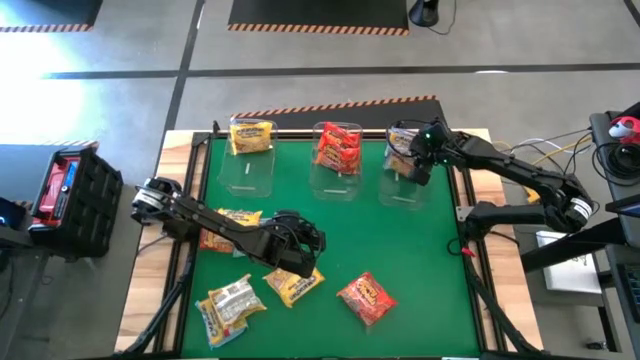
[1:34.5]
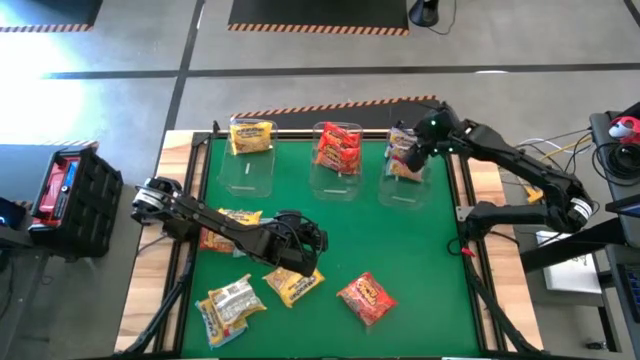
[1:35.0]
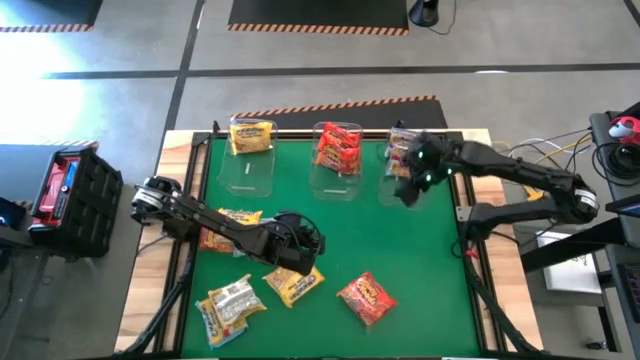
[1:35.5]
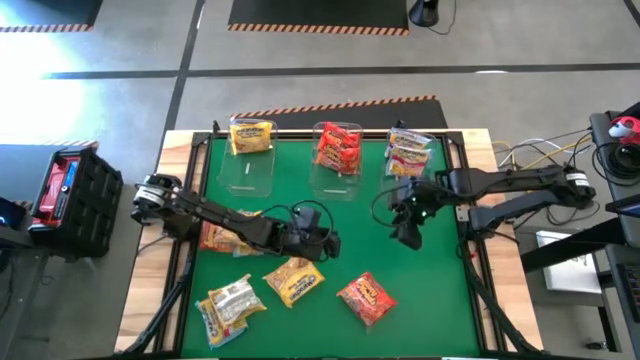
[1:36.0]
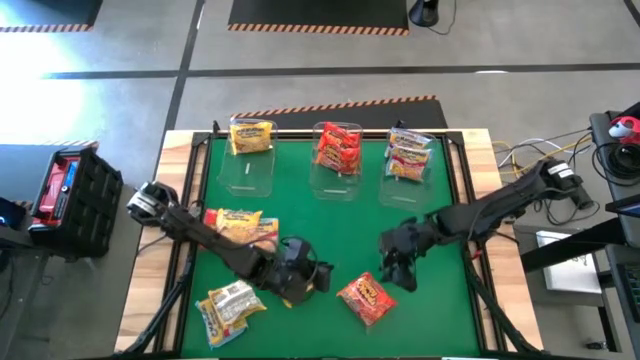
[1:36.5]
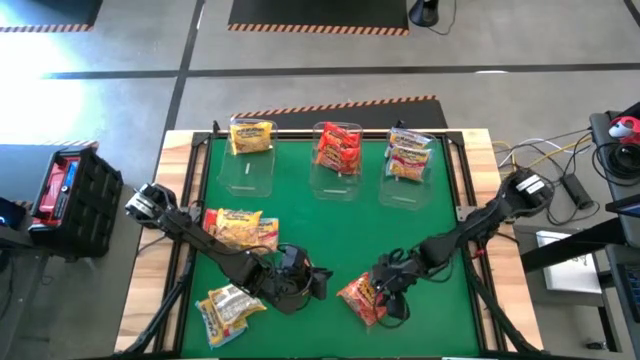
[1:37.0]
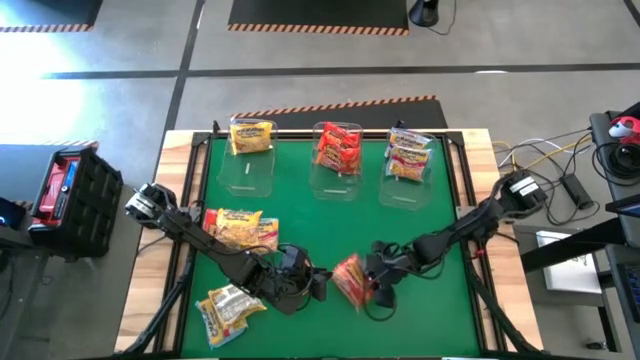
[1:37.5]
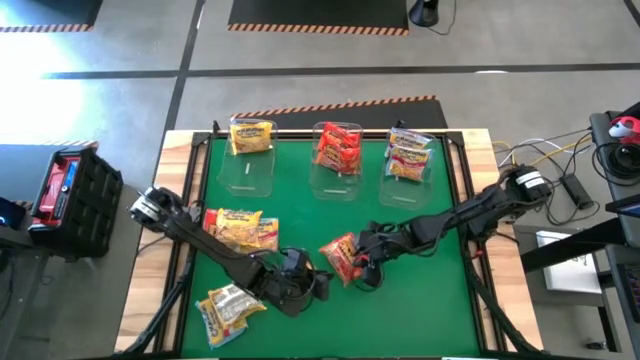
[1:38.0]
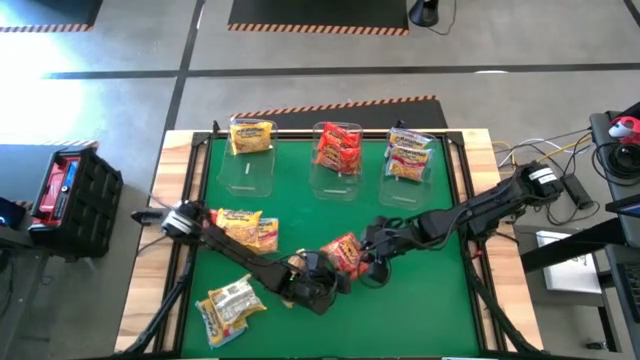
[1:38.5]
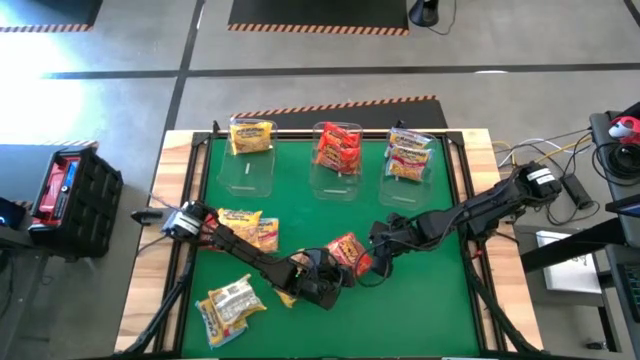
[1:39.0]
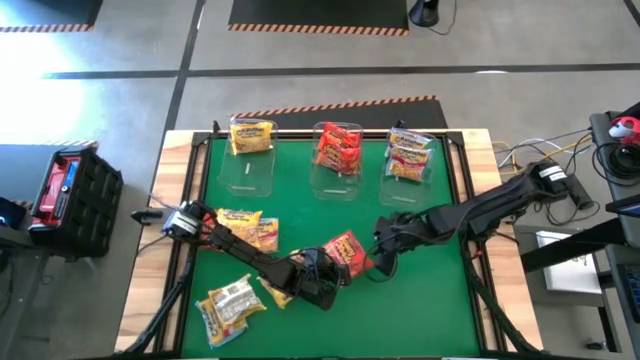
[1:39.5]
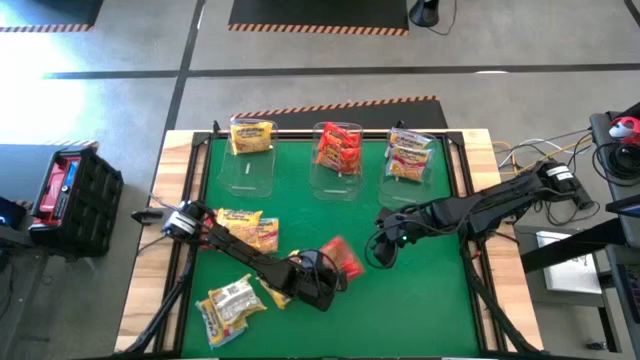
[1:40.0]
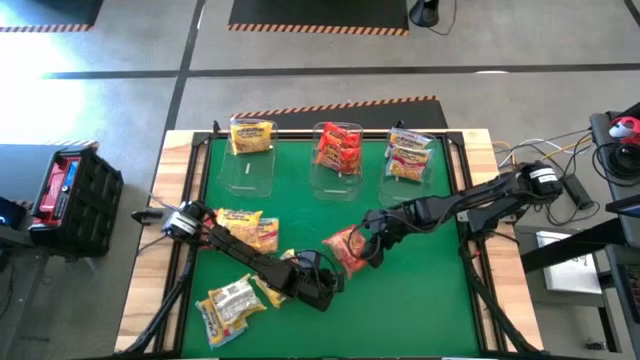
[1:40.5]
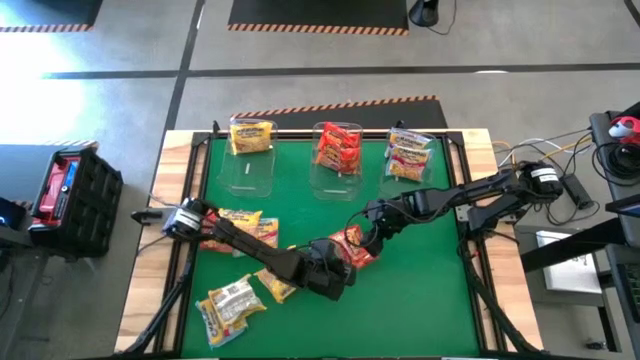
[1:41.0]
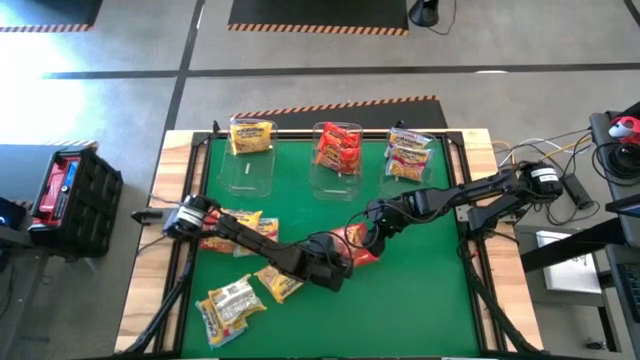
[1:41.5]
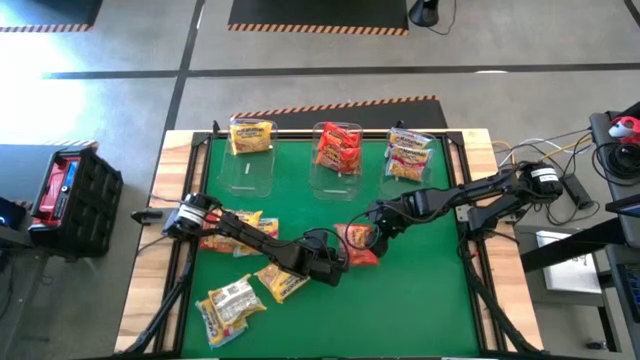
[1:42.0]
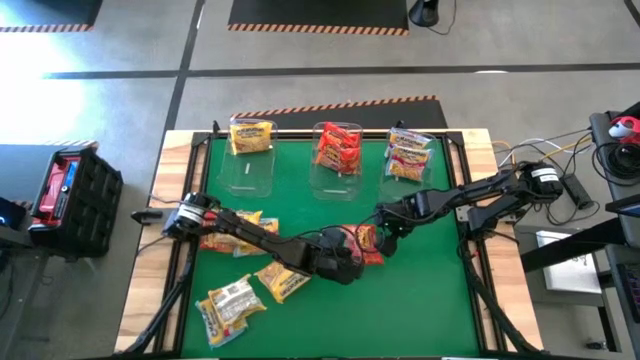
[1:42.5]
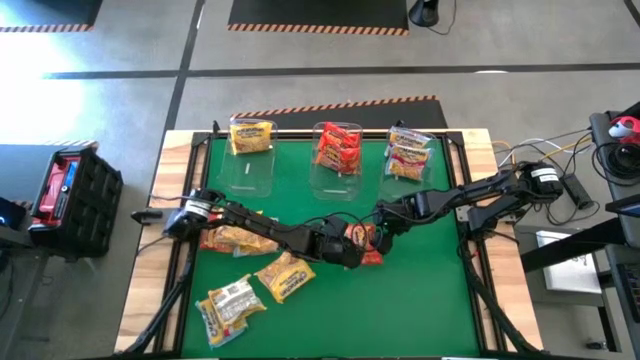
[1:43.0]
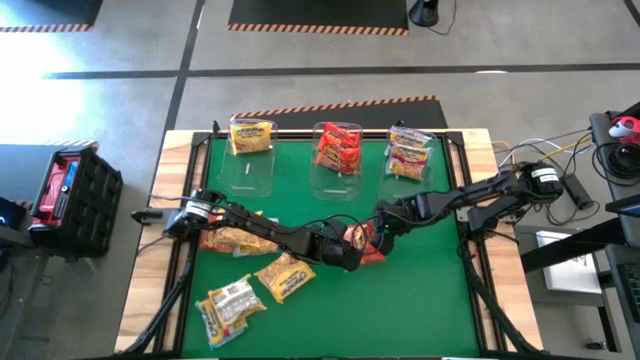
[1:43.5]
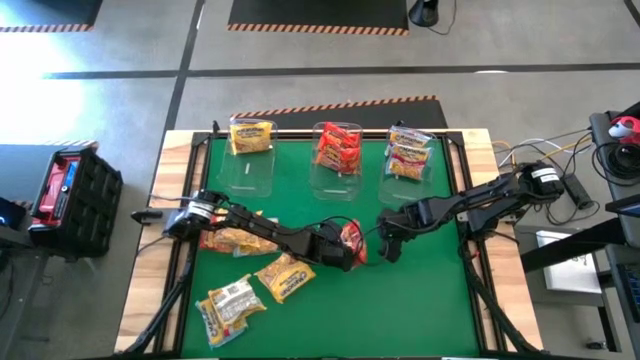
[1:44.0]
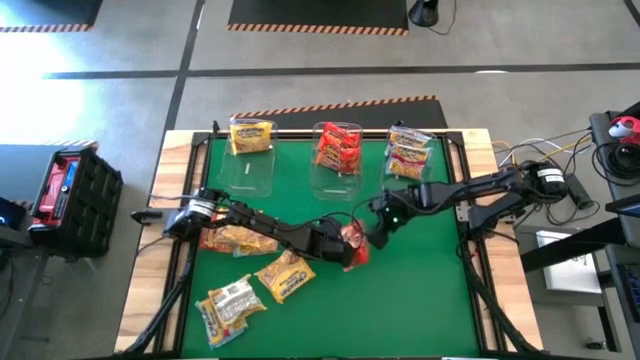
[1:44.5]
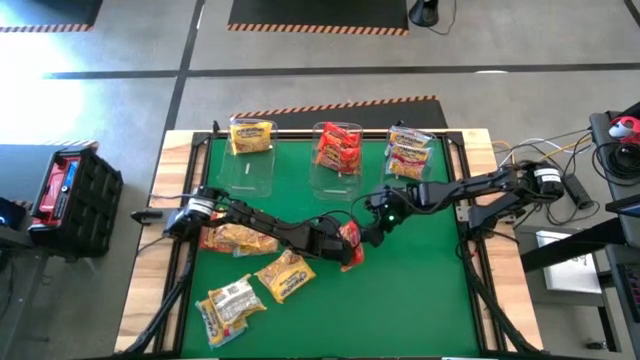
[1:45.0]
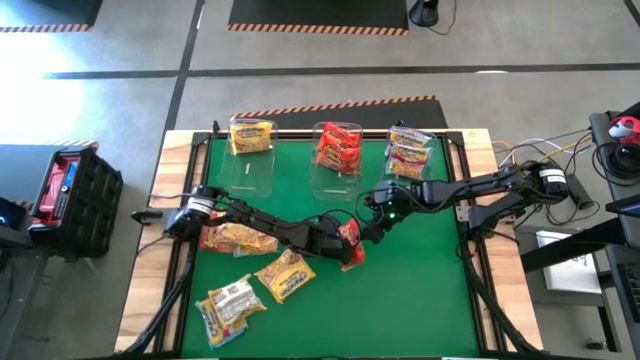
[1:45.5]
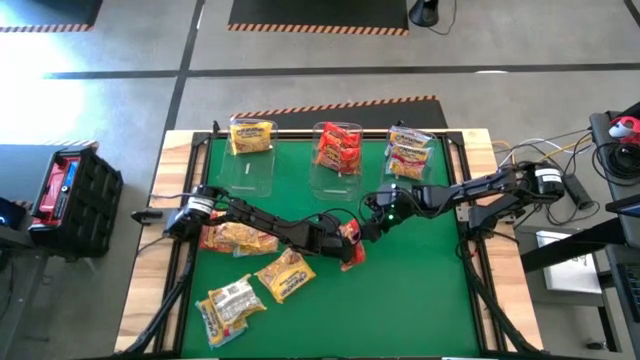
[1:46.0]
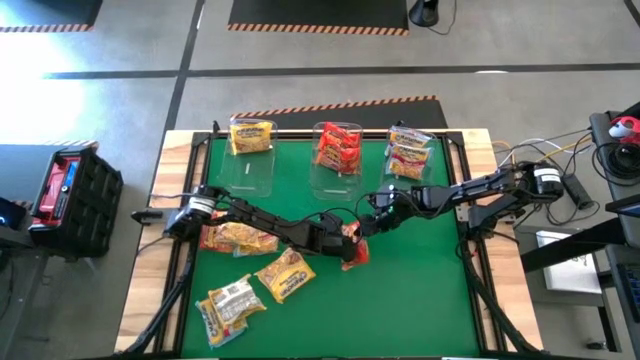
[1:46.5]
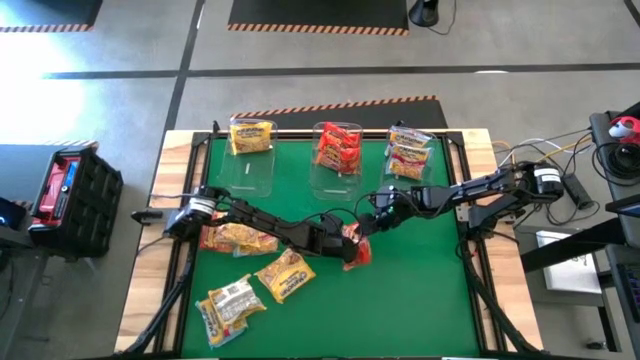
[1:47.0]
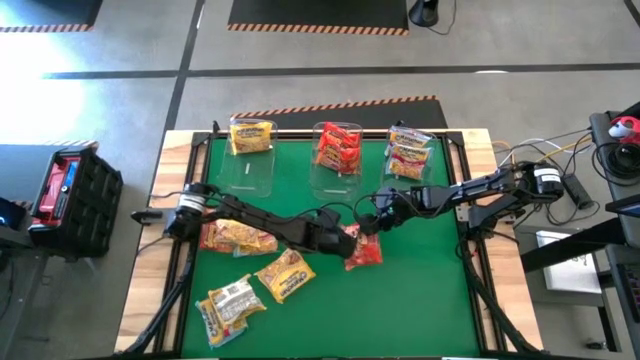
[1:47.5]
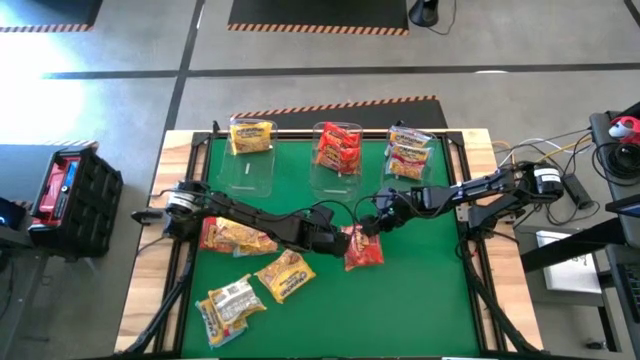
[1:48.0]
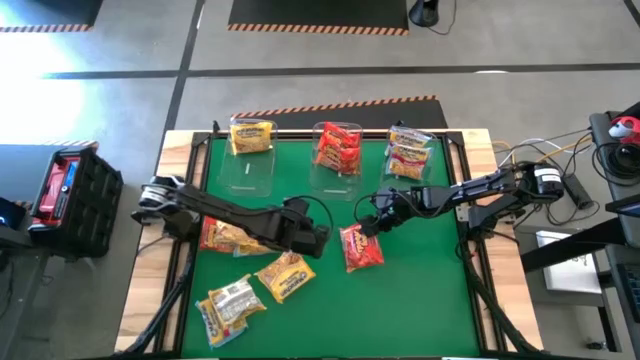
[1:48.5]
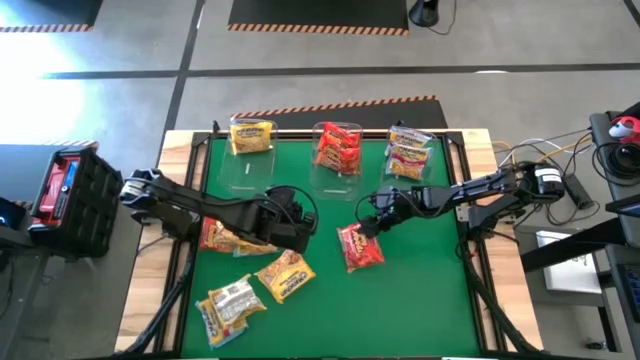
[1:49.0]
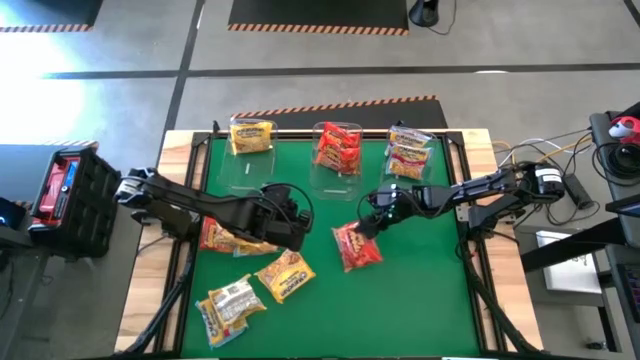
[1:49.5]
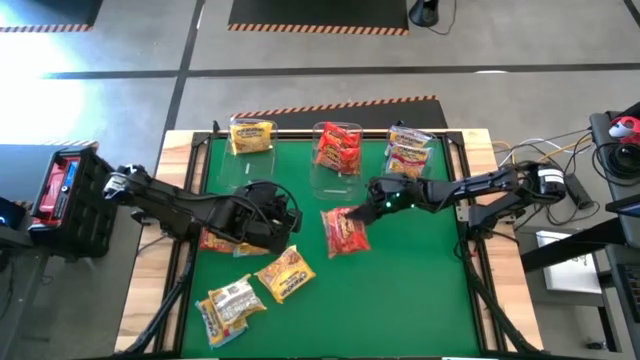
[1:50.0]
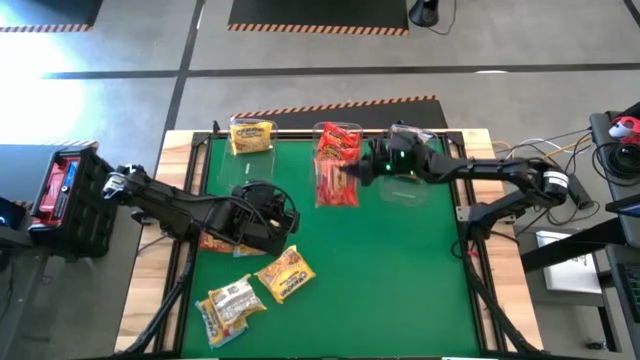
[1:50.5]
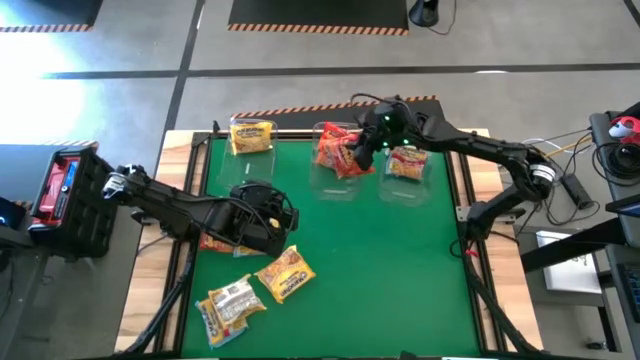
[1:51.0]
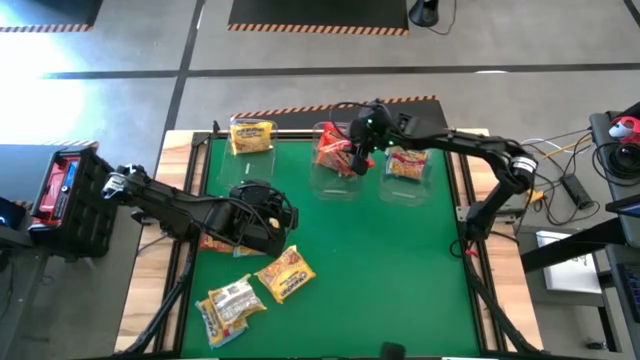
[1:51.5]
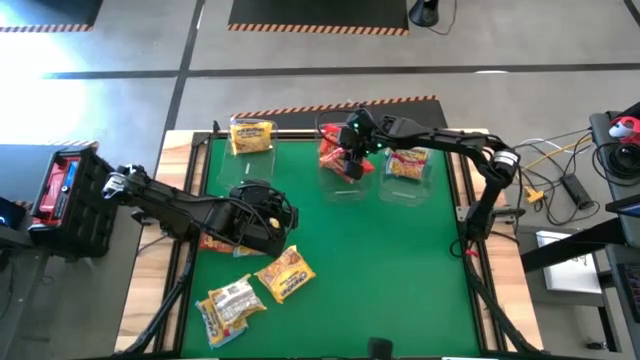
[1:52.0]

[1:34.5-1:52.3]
Task: Sort Maruchan noodles
Put the orange noodle pack into the middle transparent bin

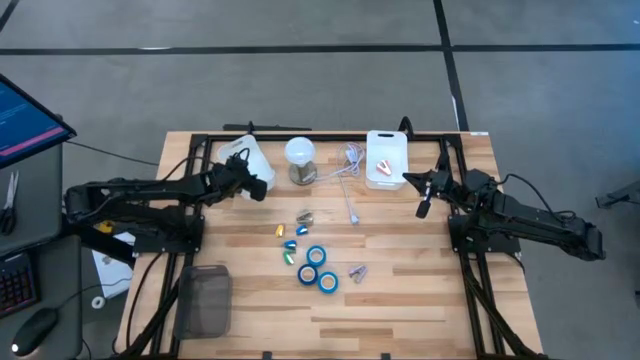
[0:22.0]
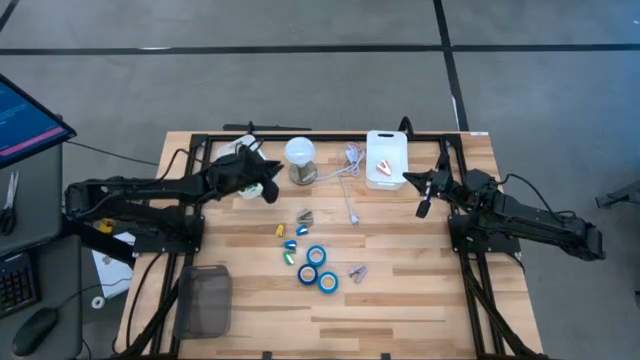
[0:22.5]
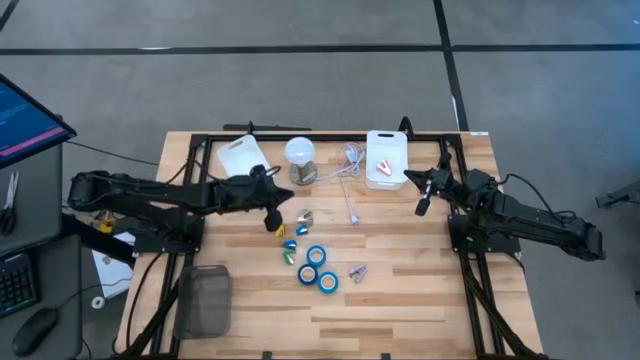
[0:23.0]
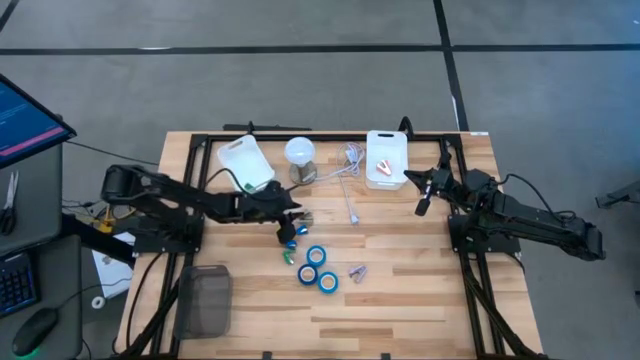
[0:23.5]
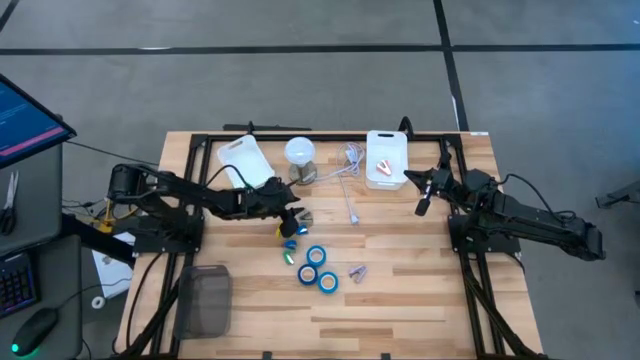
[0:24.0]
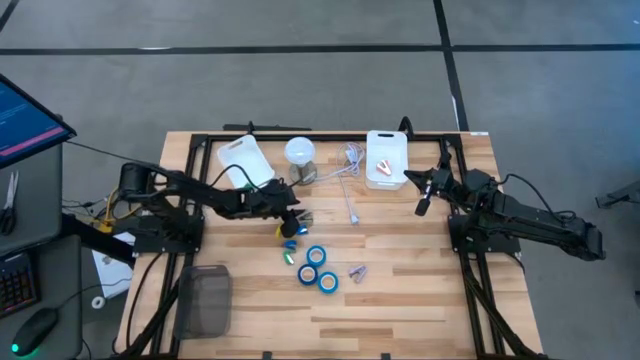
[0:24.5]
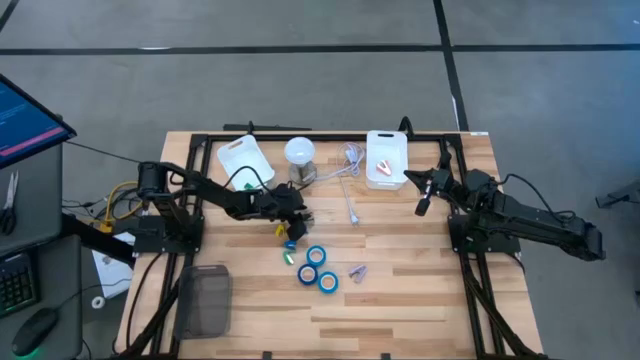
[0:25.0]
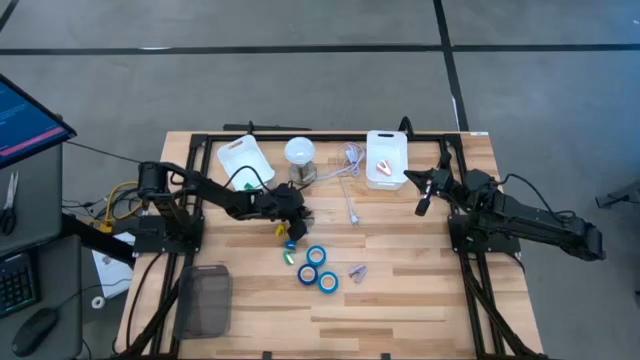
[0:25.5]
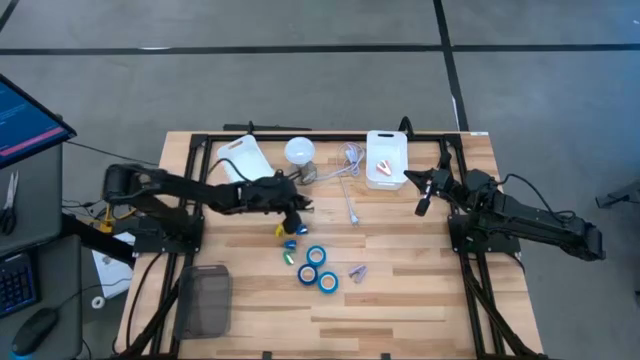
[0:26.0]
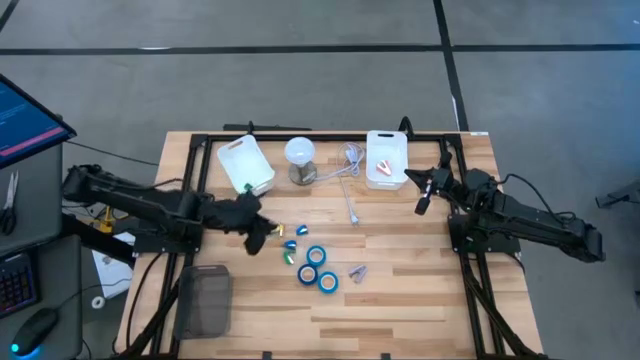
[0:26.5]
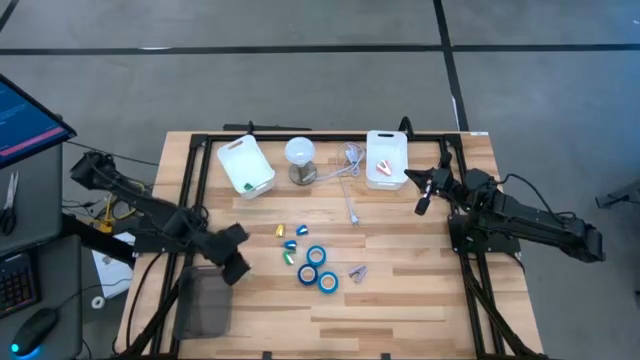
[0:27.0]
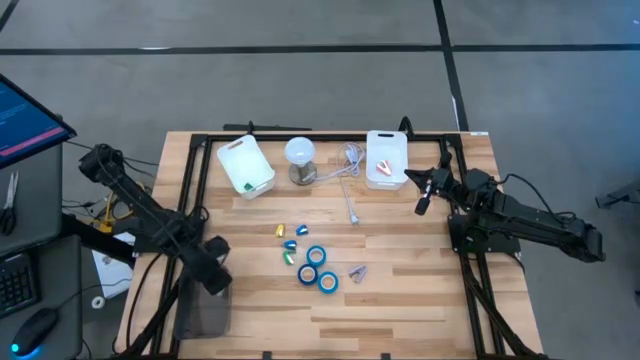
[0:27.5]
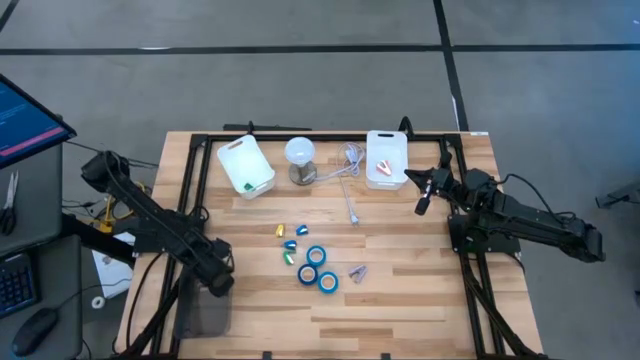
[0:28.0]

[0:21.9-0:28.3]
Task: Pick and place Stapler, Stapler remover, tape
Put the gray staple remover into the right white bin
